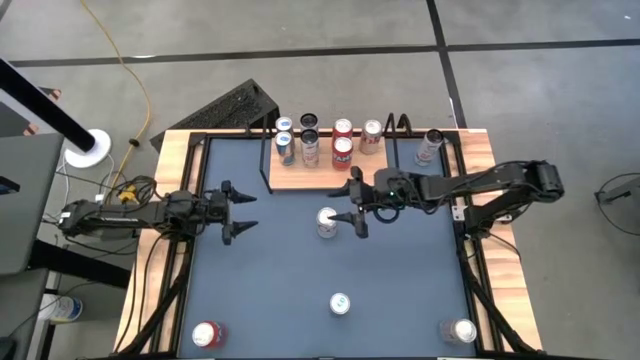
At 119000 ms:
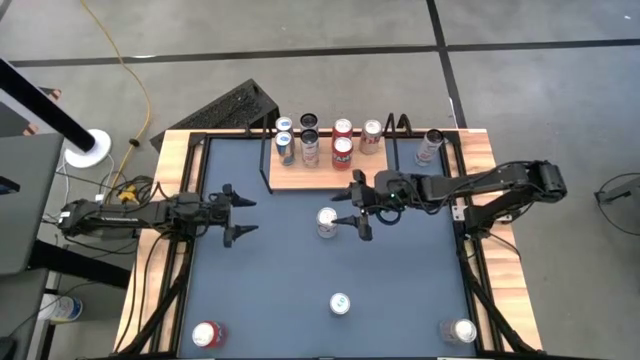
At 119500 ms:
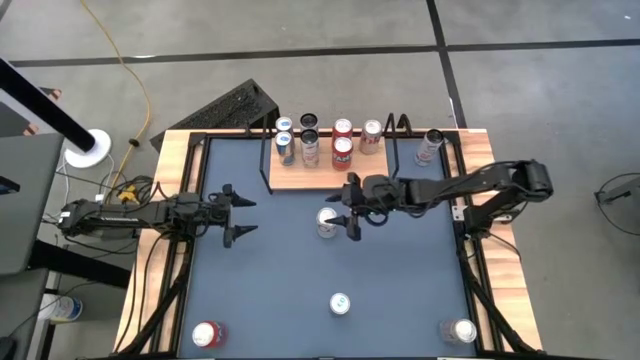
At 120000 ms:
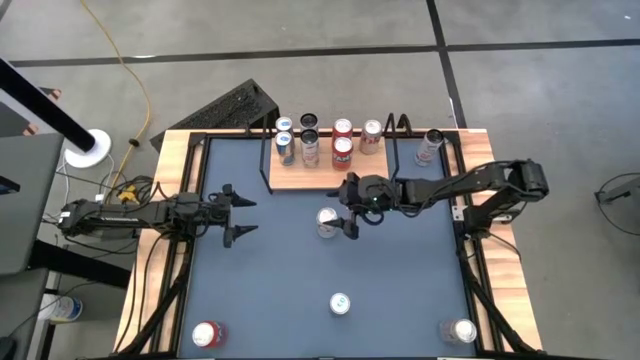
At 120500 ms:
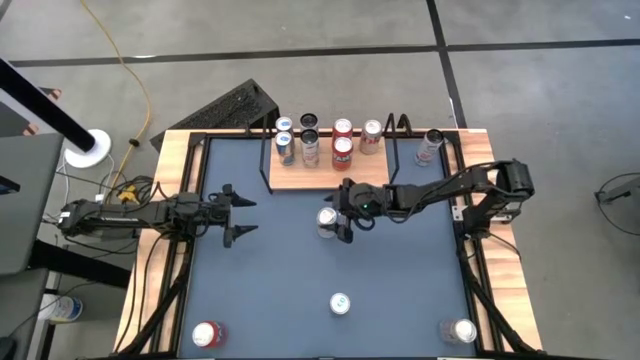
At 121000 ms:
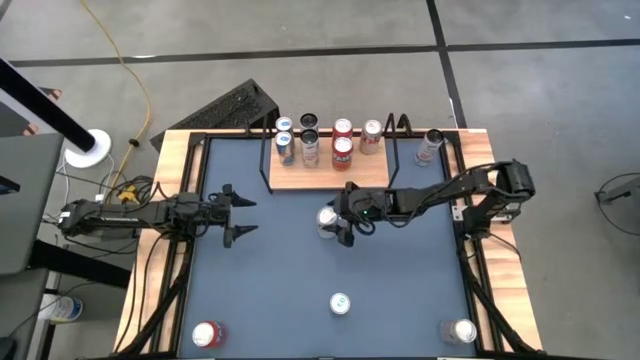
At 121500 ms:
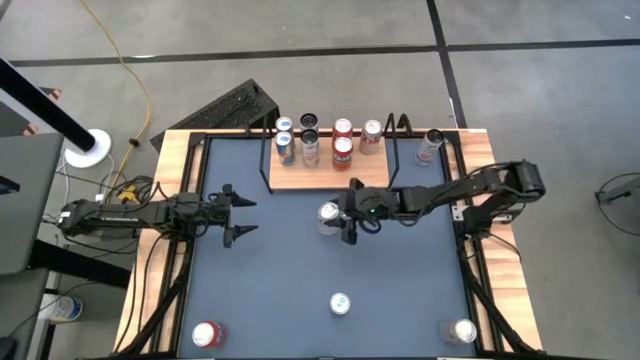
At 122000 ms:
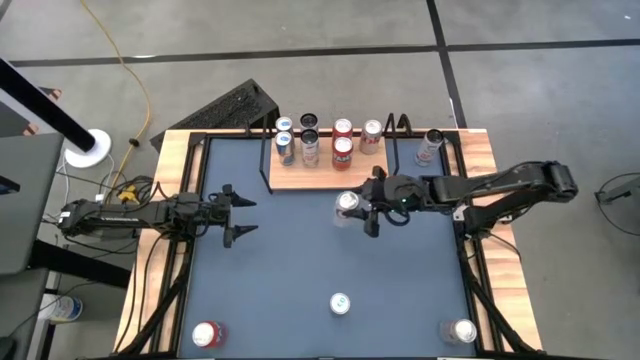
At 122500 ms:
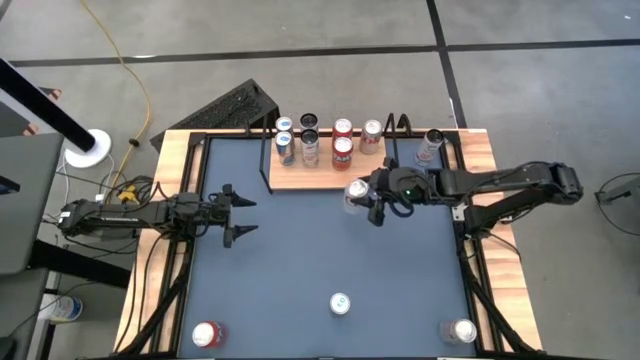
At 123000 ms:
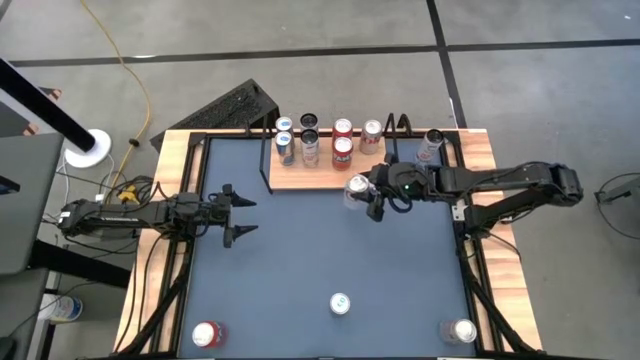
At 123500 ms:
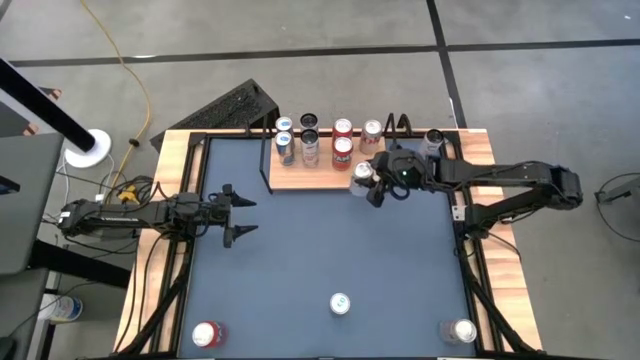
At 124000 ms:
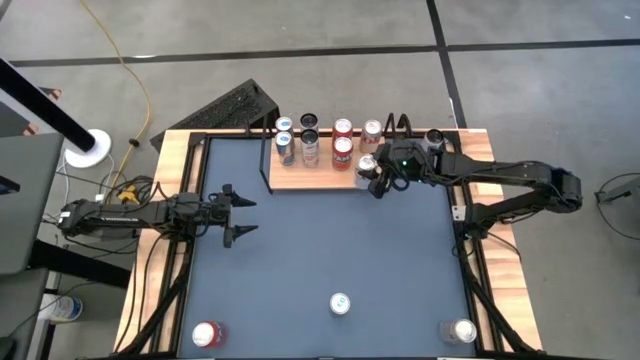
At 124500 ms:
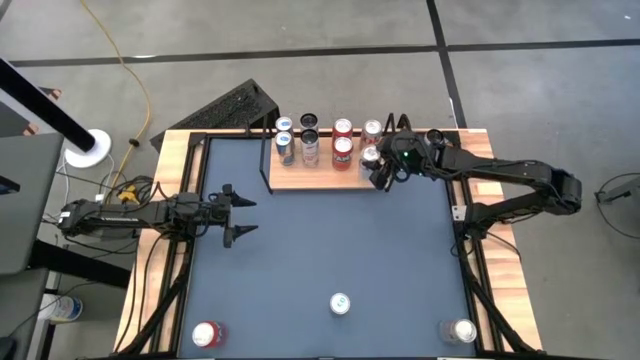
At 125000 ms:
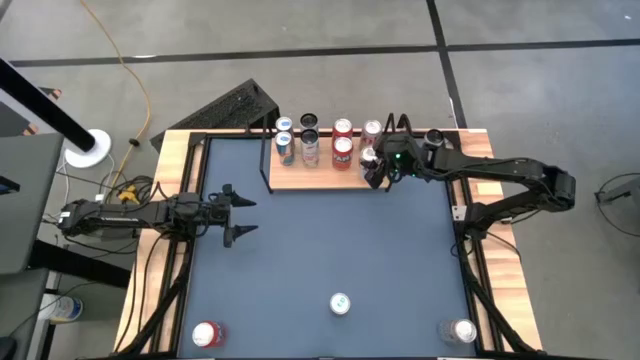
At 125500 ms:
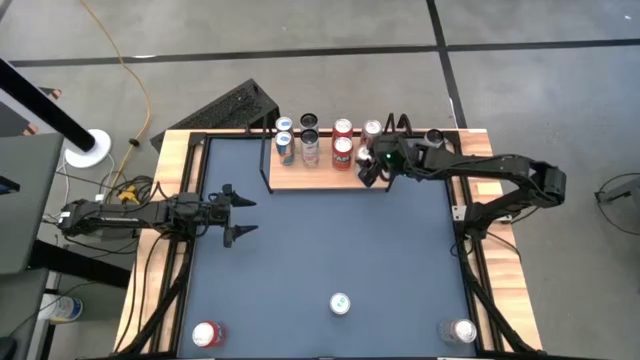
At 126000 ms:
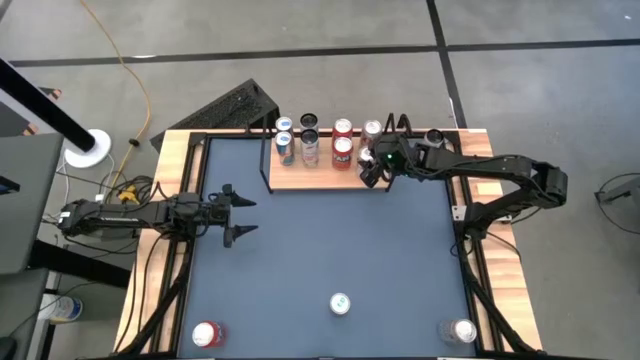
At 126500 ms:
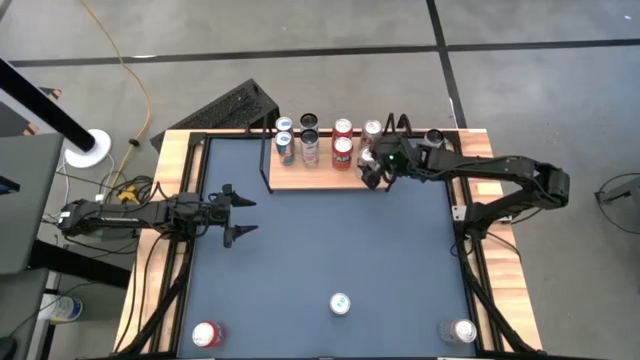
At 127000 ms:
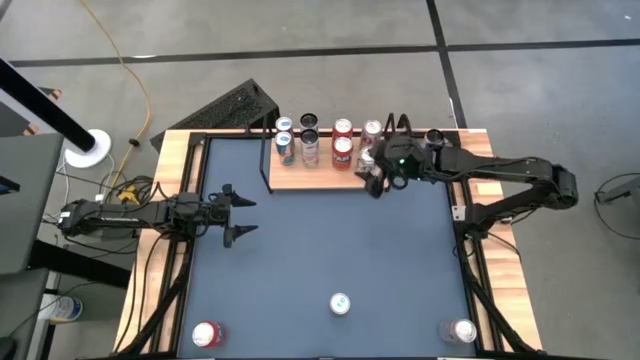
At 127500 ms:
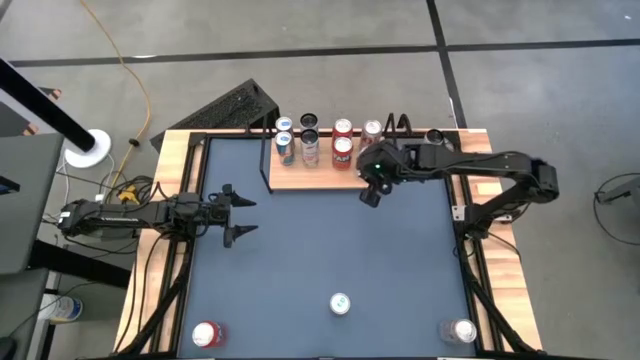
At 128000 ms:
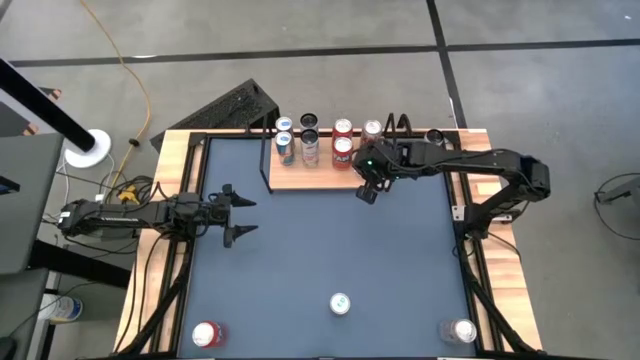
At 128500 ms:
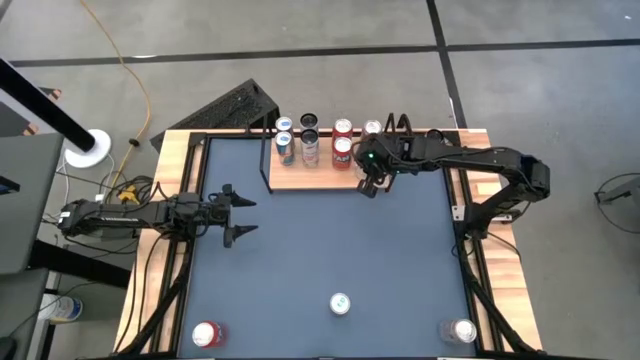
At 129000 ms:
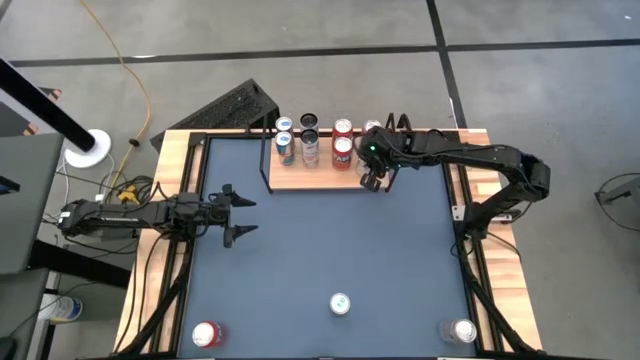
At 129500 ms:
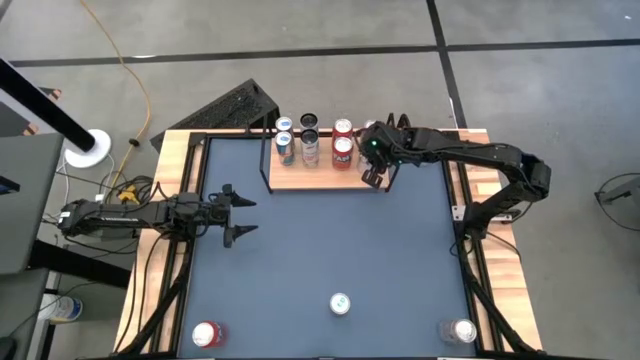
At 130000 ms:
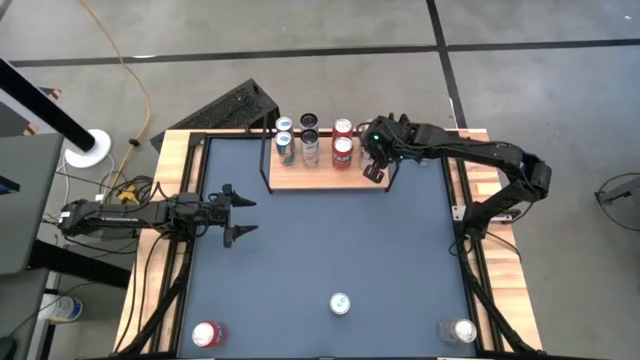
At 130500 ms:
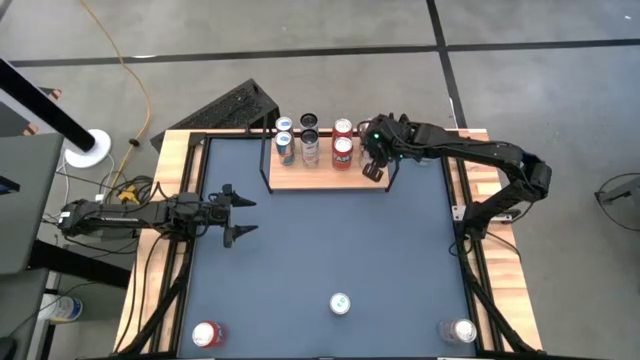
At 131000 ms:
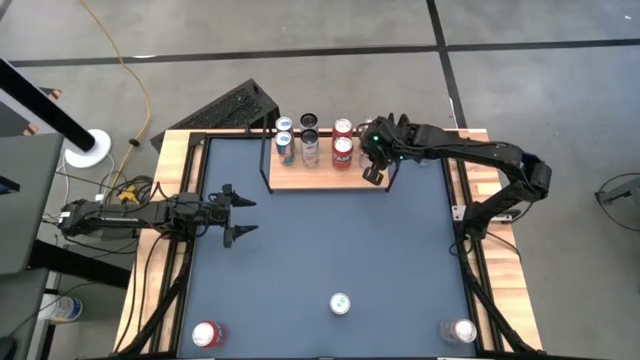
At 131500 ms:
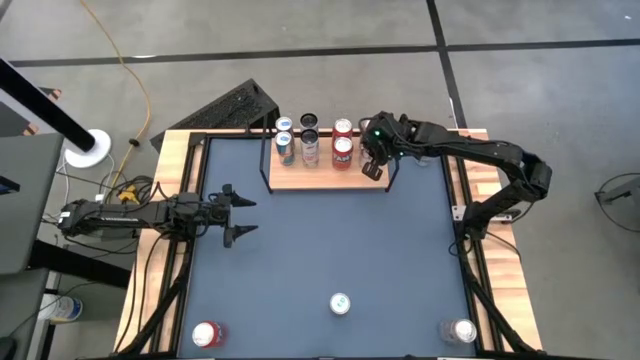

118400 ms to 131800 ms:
Task: Place canned beverage on shelf
Put the top red-silver soda can on the shelf aligned with the other red-silver soda can

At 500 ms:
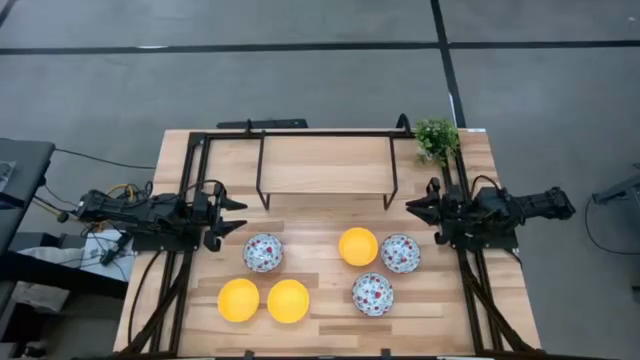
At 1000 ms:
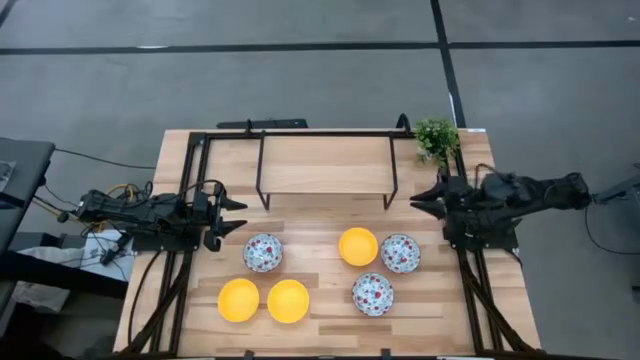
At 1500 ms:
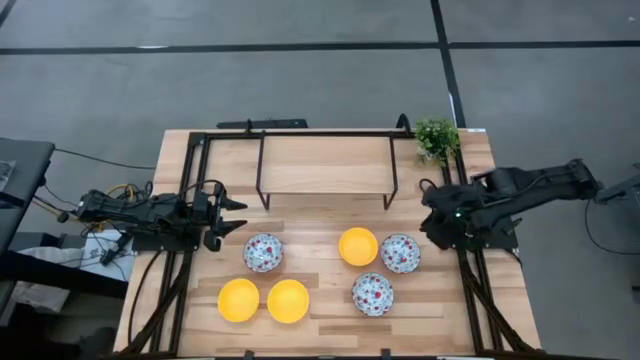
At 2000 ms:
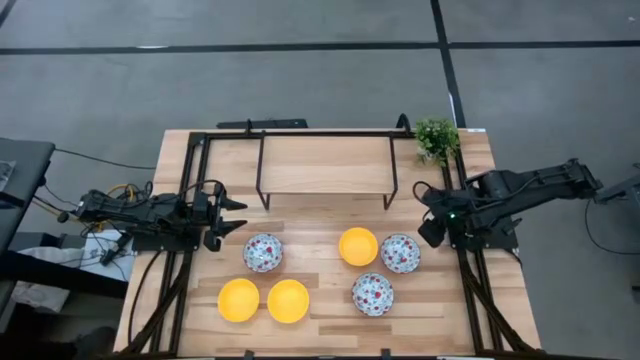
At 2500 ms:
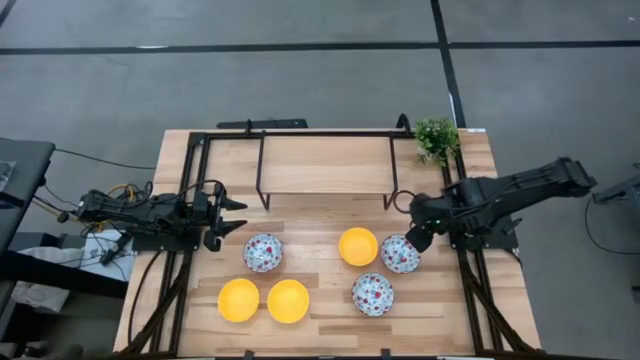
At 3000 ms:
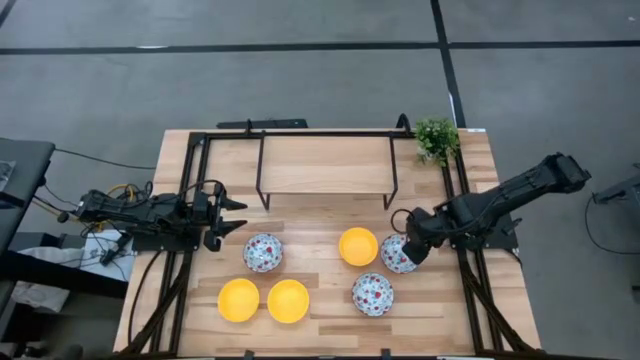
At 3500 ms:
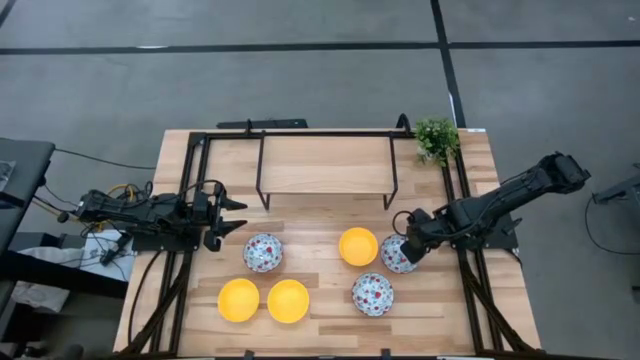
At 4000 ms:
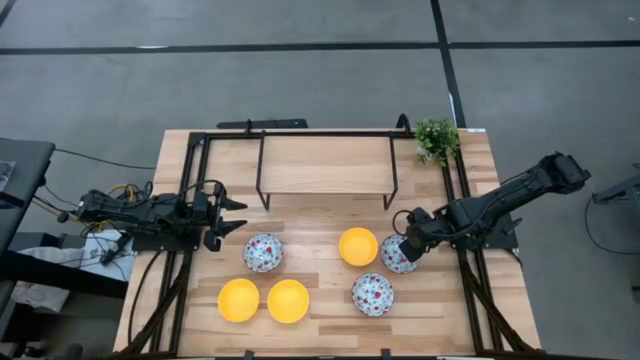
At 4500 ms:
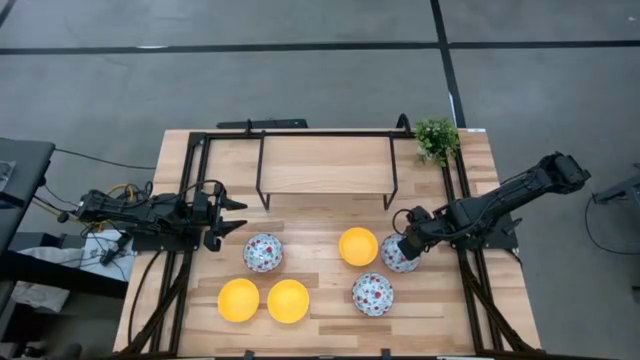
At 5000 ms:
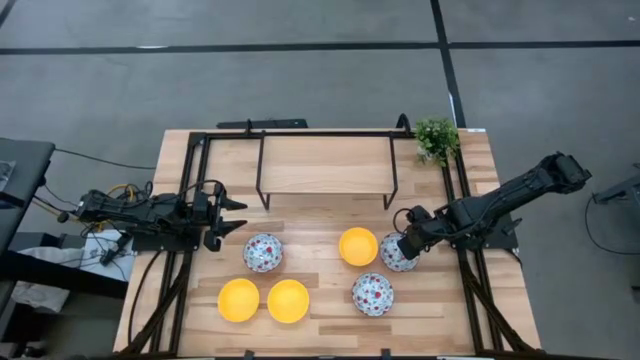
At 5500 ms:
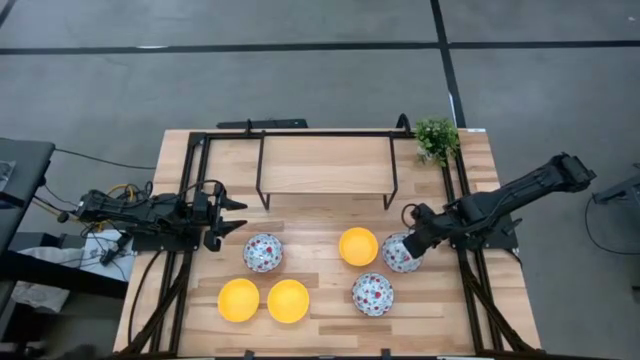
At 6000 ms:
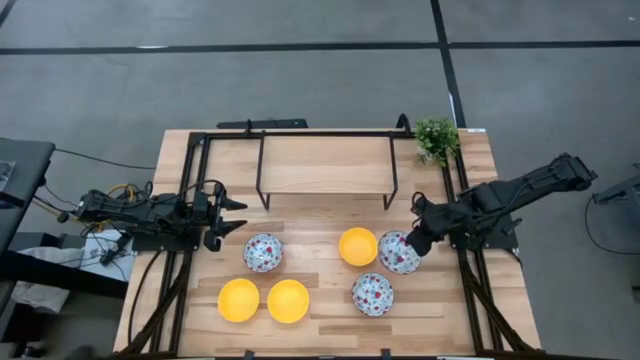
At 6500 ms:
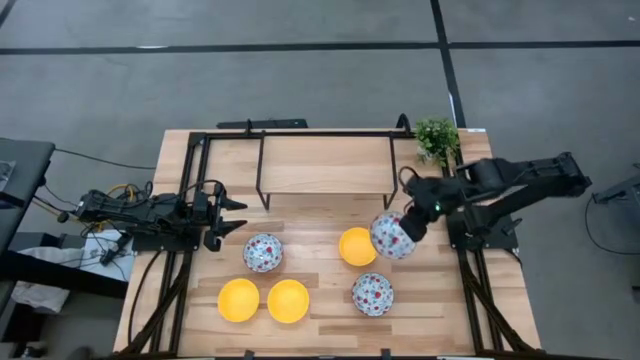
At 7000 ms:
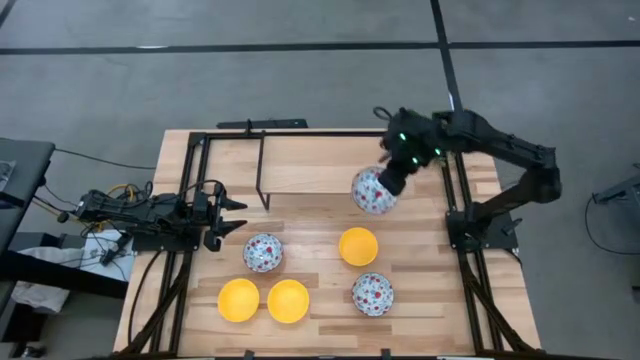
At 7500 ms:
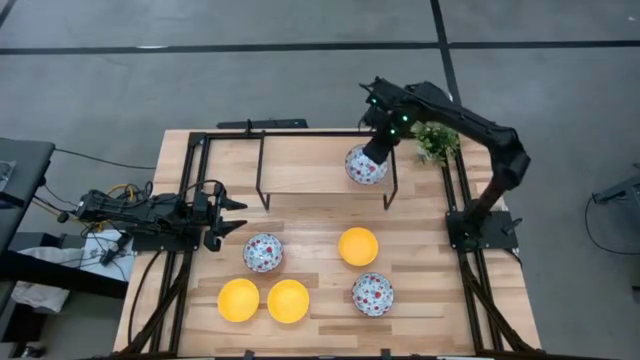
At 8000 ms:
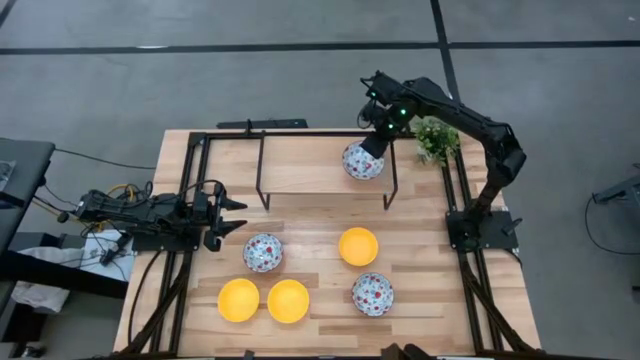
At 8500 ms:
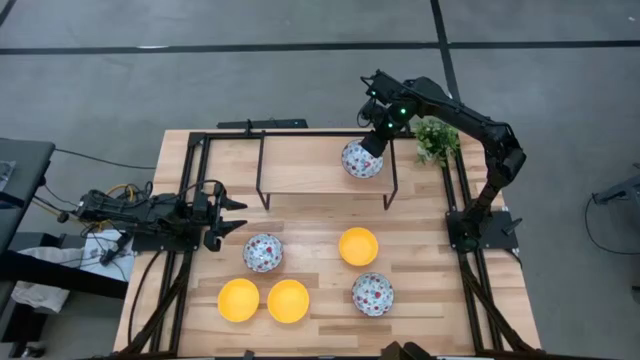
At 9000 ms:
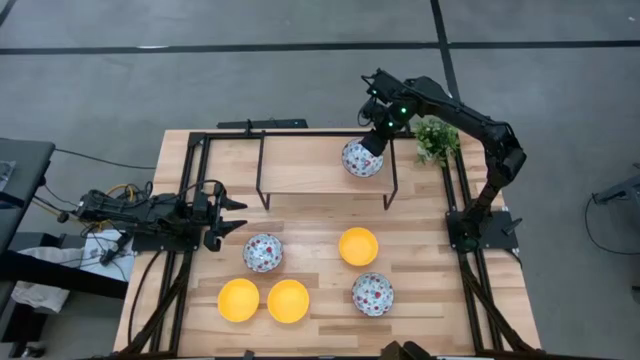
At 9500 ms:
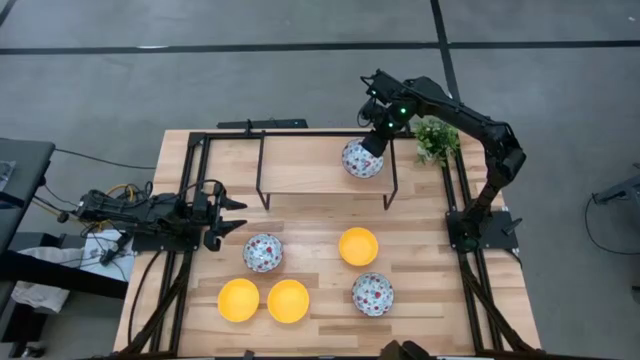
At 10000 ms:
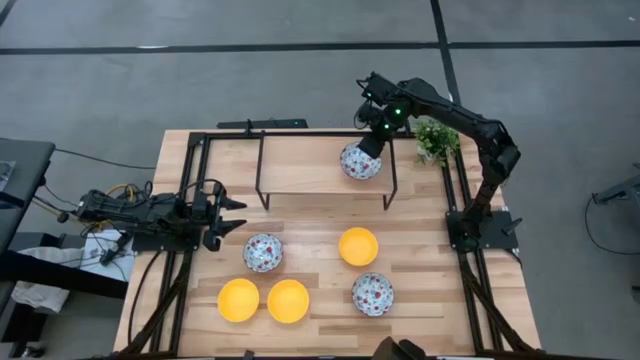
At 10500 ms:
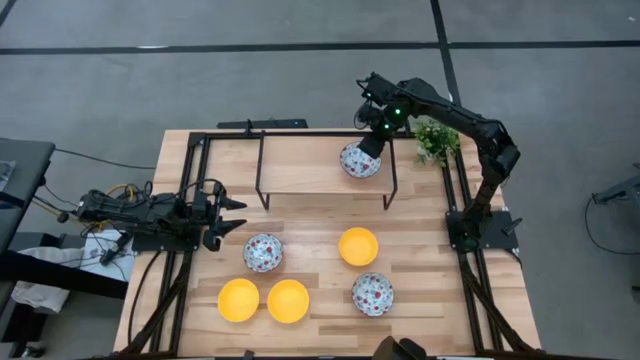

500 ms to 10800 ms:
Task: Pick & Place Mini bowls
Put the top right red bowl on the shelf
